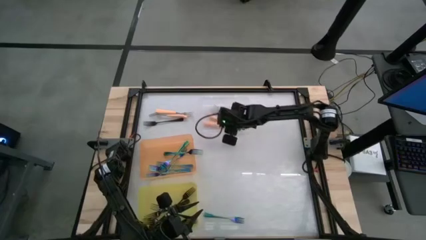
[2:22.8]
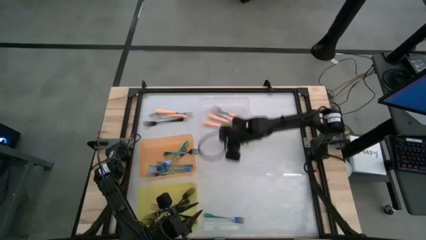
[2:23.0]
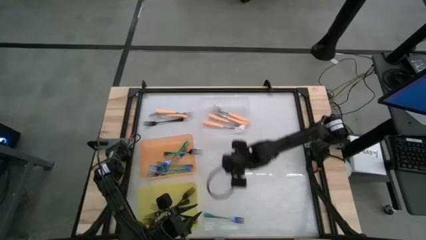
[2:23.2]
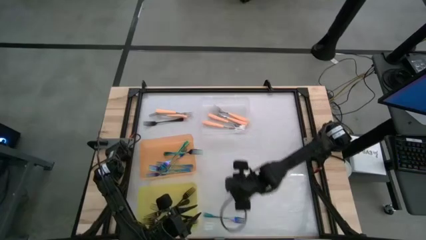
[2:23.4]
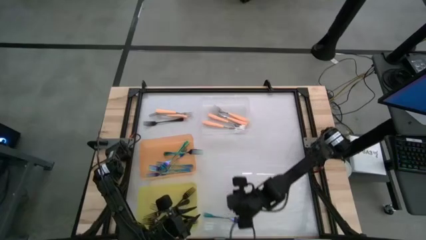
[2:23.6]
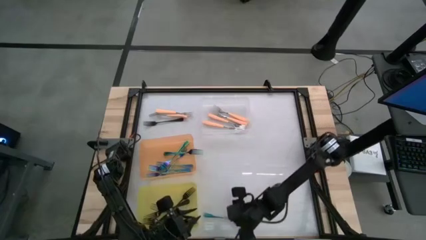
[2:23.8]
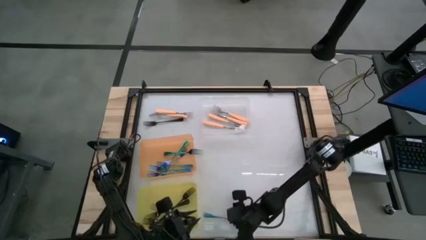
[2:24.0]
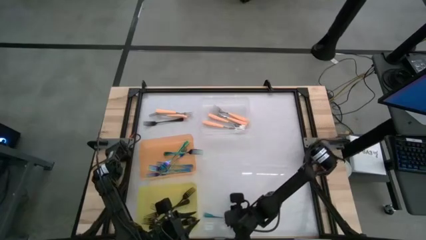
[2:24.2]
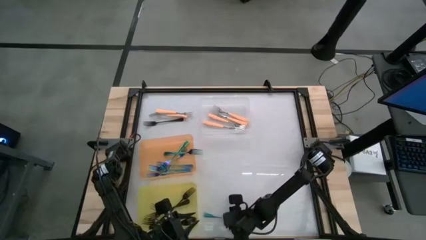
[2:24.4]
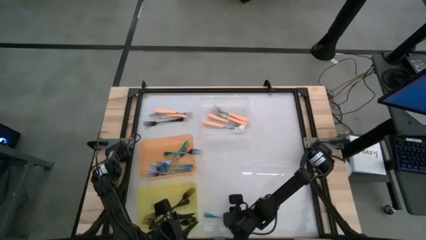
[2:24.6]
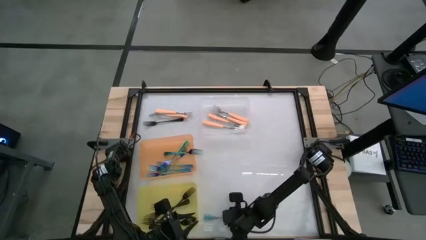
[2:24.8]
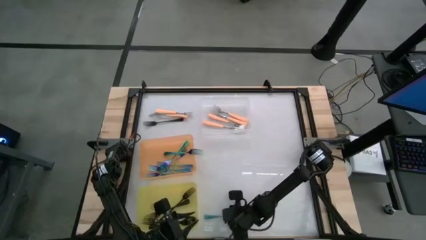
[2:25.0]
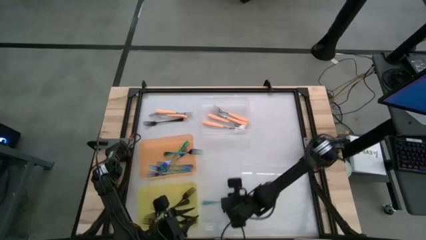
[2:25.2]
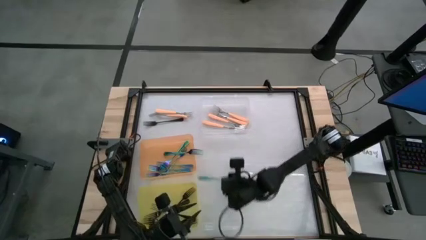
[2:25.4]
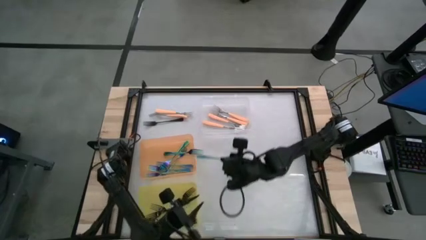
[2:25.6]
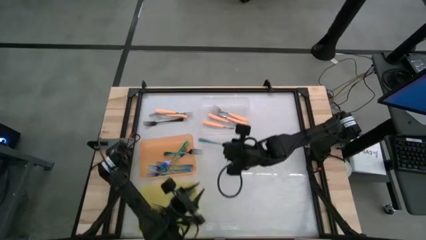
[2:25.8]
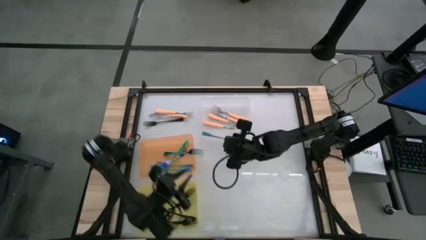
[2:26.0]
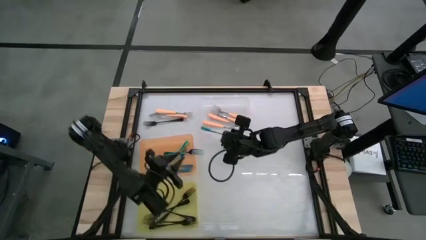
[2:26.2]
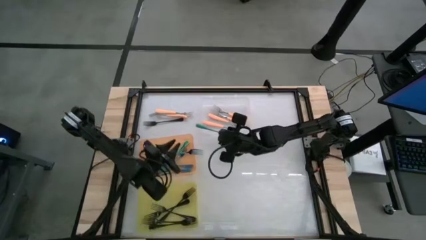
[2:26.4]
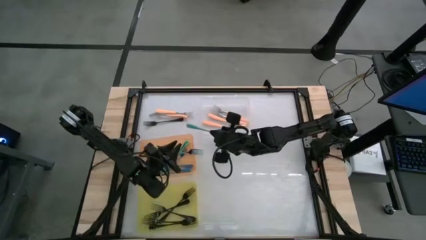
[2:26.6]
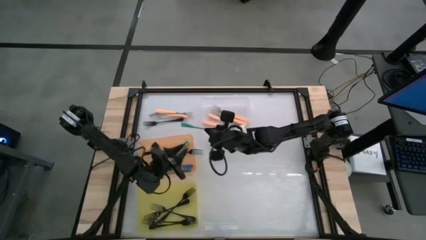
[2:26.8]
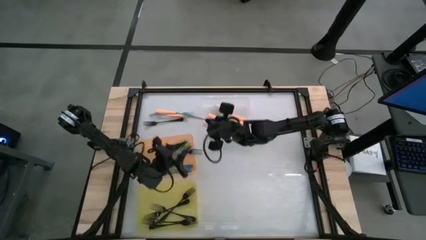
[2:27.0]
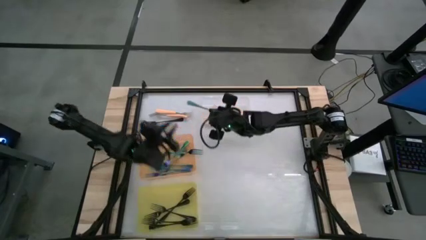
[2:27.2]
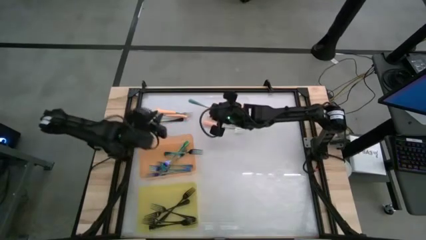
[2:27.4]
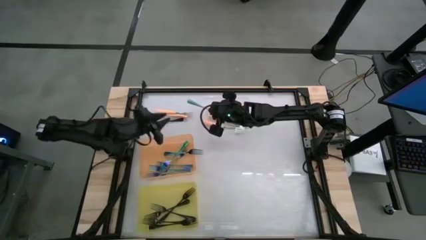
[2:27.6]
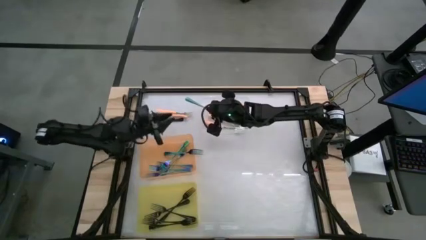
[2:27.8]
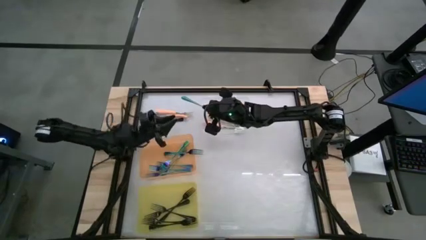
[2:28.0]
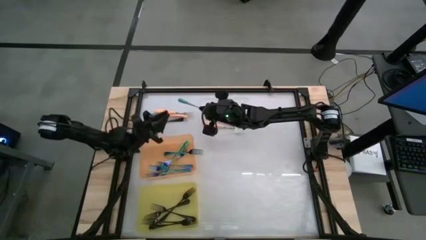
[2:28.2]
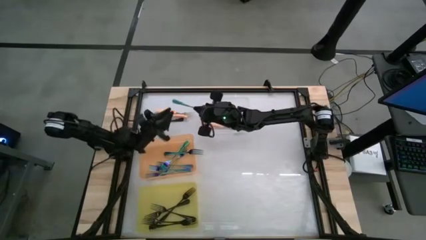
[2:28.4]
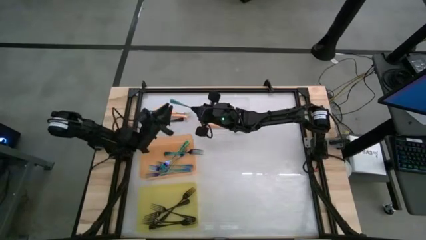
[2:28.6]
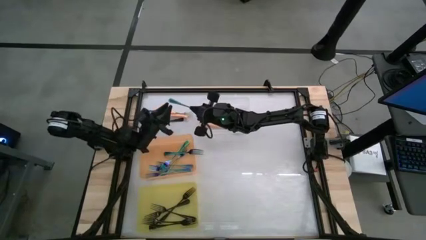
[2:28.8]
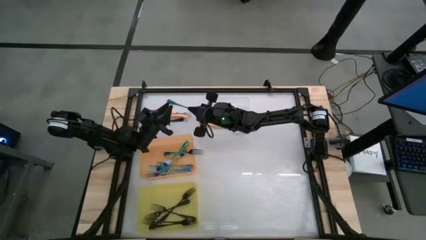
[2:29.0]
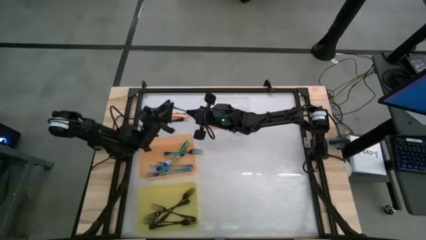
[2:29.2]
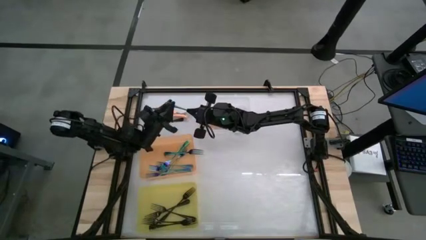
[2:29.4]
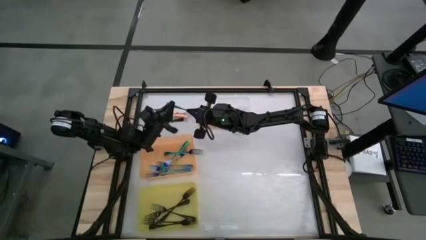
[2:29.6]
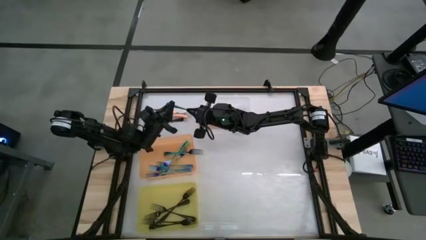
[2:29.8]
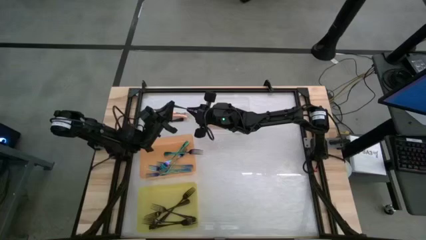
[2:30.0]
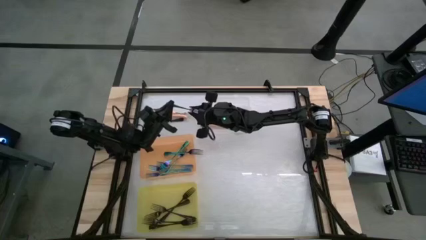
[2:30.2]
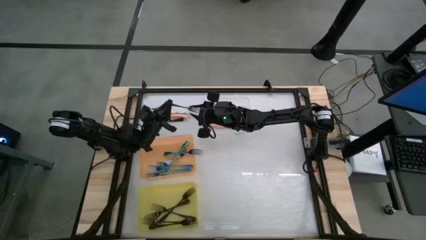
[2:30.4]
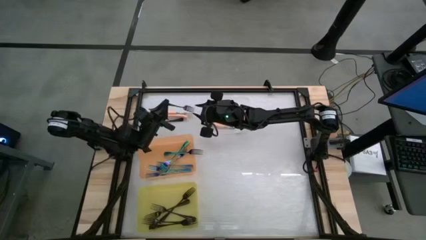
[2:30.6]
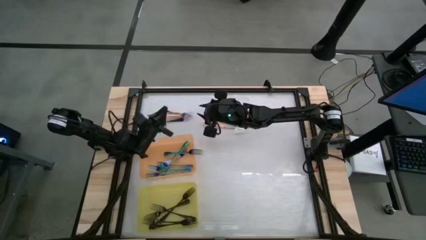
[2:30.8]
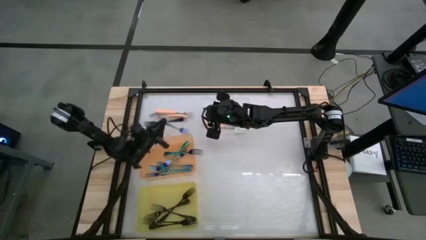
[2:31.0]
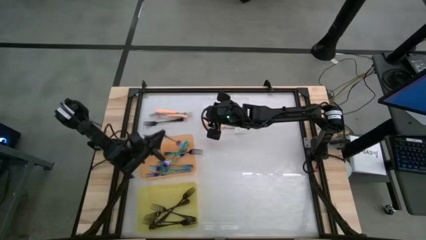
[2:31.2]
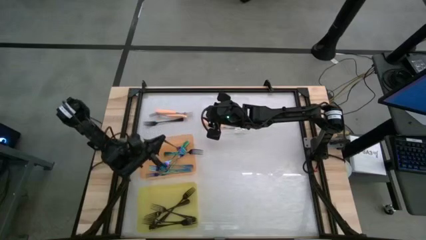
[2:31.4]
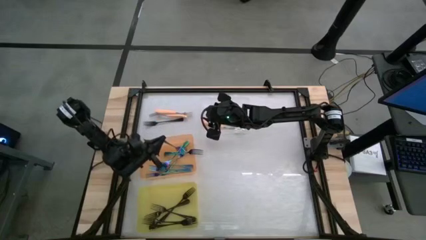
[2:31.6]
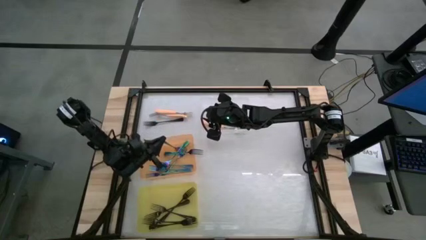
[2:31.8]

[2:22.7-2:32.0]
Task: Sort silverware by color (type)
Put the blue fork into the orange bin

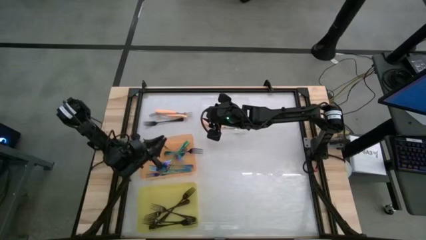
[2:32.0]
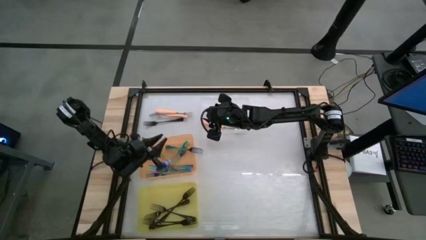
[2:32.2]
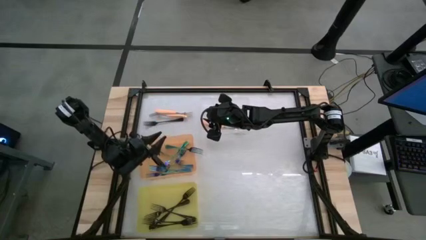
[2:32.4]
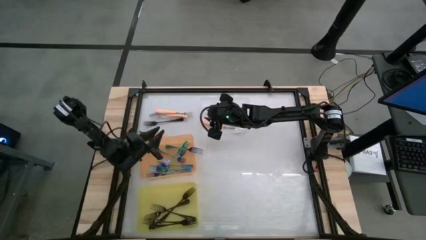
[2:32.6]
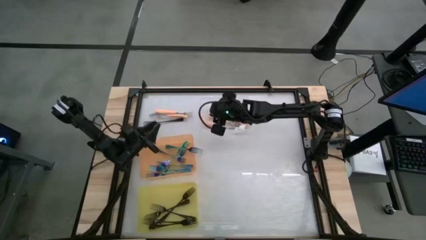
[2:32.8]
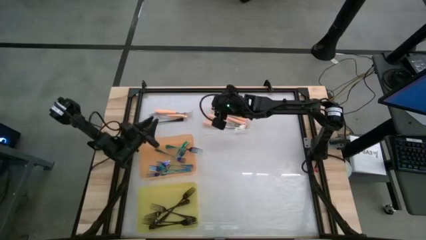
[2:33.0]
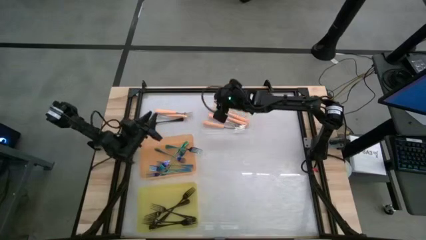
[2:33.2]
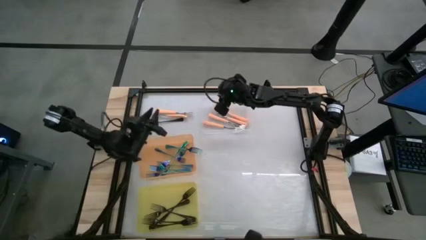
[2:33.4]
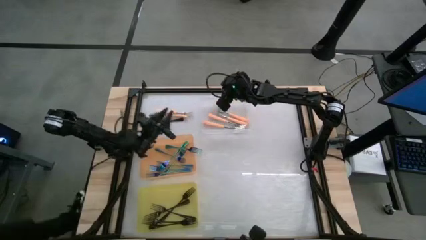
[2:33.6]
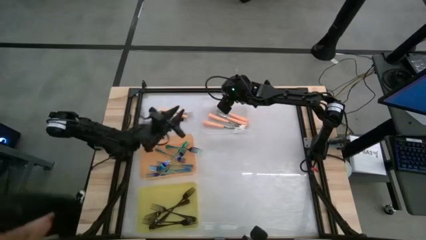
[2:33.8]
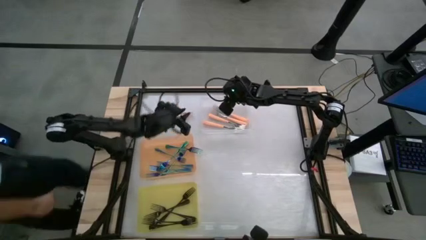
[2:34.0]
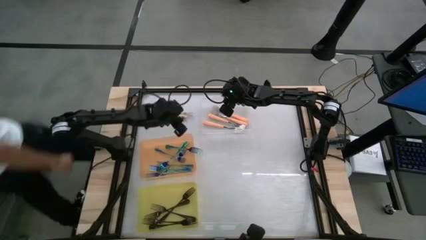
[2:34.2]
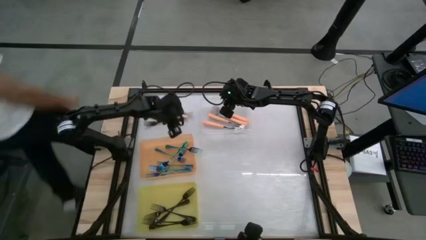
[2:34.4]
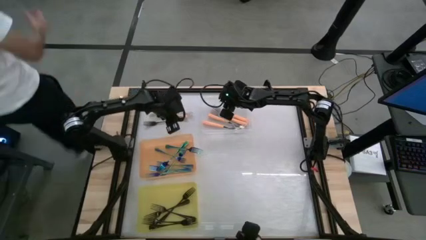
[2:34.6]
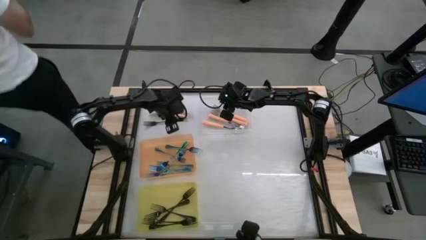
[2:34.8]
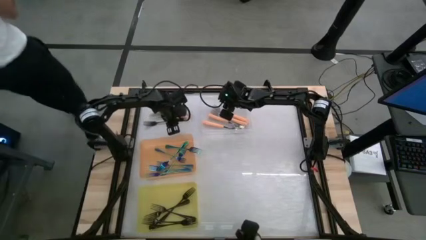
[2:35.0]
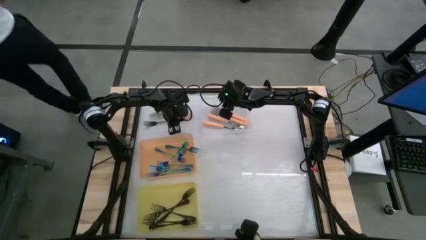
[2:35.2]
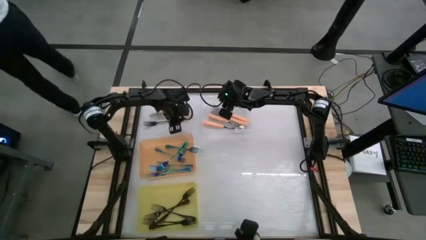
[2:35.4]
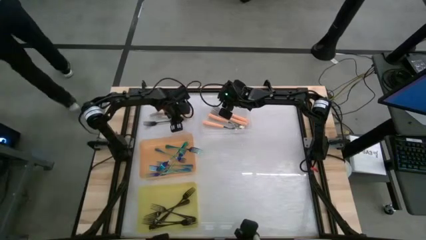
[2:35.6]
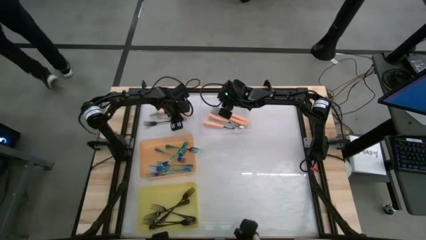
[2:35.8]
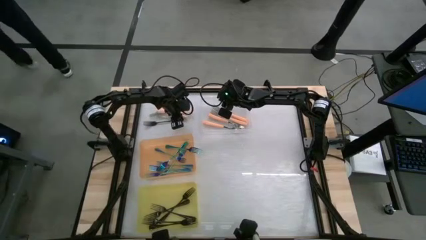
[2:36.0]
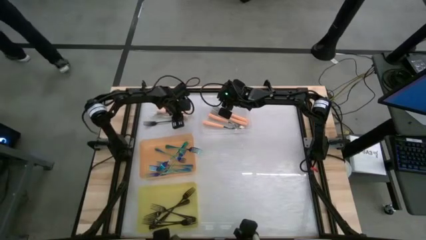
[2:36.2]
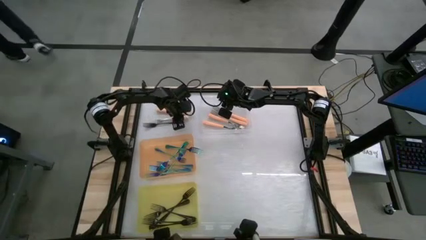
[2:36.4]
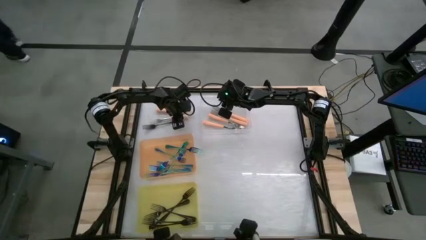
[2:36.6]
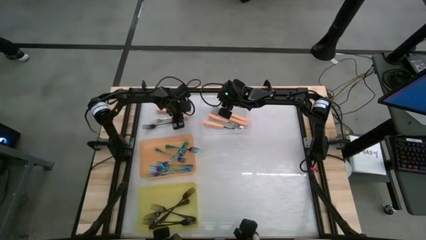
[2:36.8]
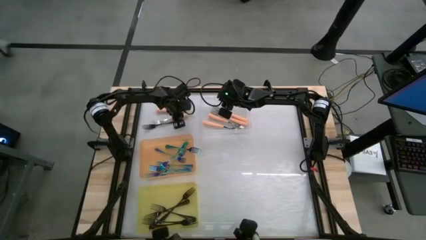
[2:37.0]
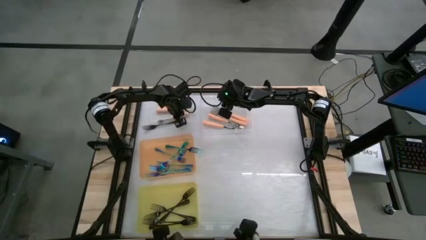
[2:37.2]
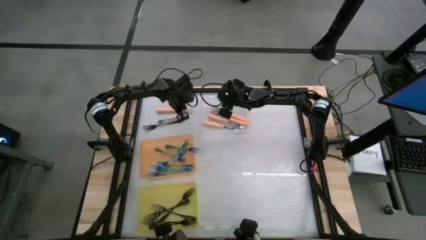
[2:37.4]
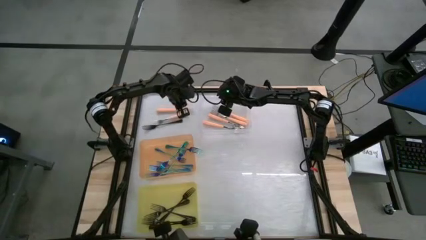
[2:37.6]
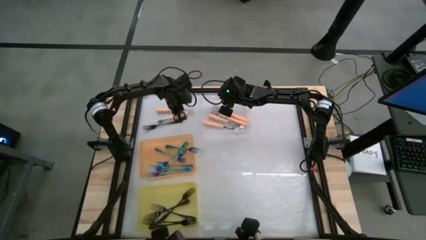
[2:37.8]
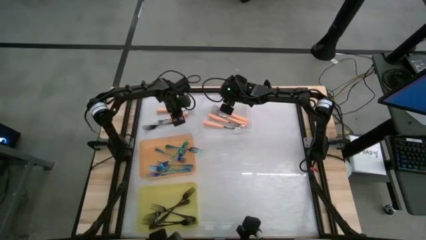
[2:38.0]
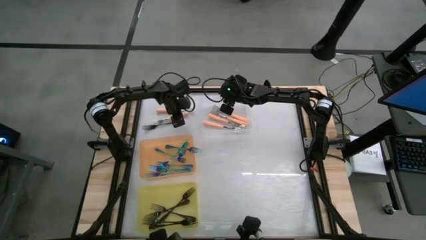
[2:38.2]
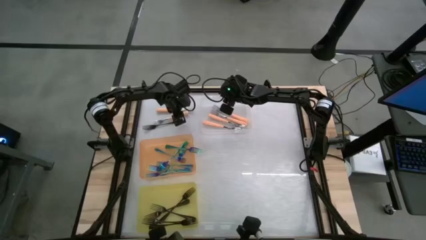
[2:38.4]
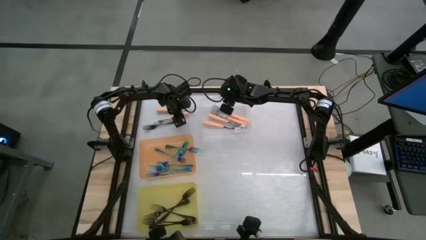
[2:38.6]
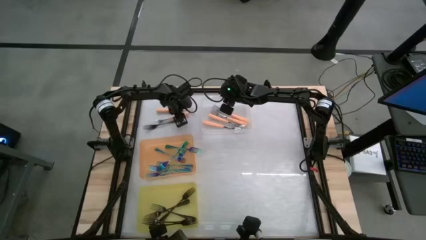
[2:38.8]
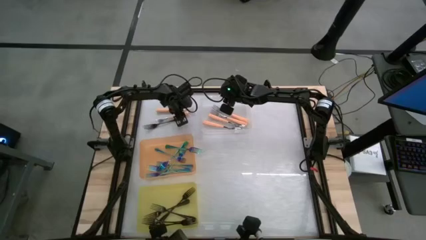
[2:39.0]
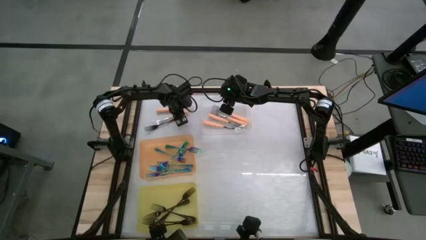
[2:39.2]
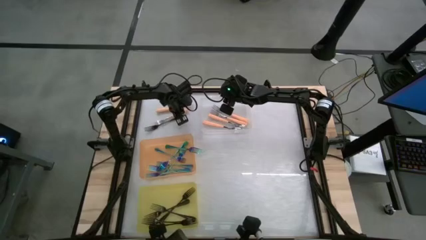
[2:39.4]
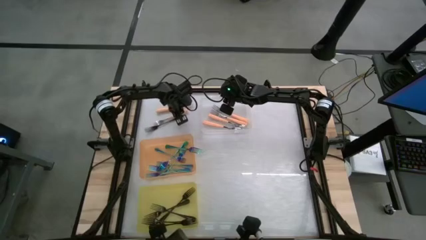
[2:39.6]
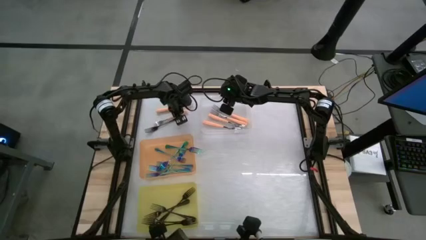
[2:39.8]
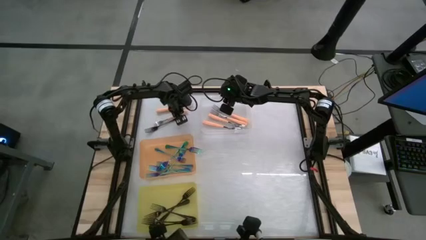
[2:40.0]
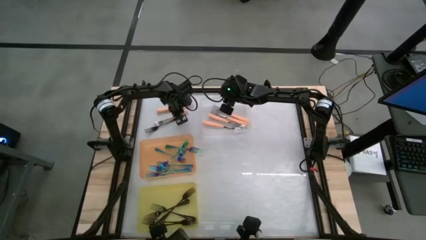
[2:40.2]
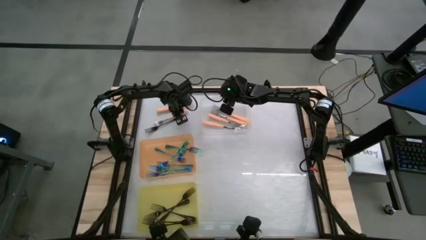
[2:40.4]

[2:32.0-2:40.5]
Put the orange fork into the transparent bin
